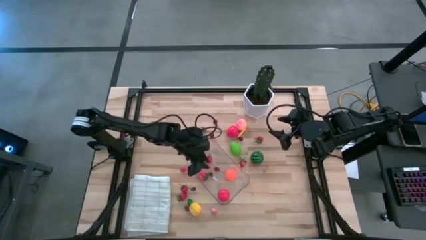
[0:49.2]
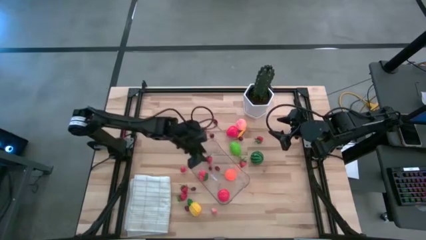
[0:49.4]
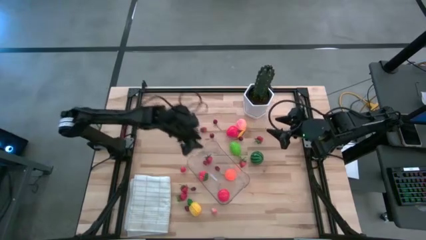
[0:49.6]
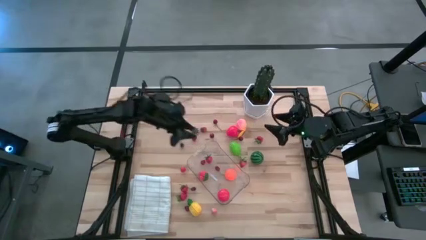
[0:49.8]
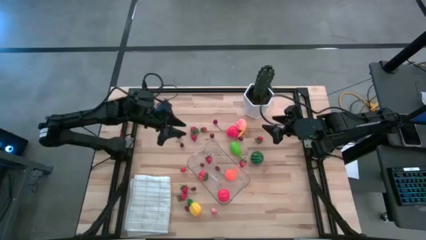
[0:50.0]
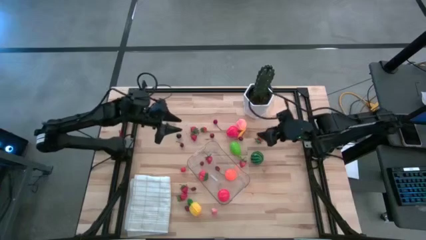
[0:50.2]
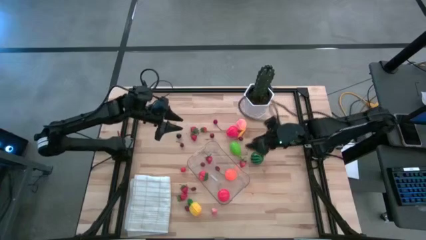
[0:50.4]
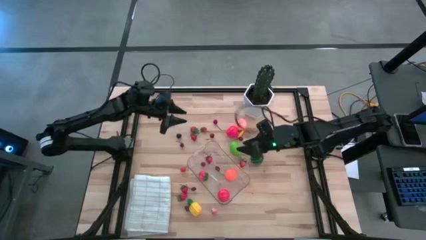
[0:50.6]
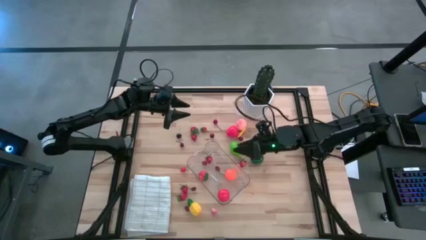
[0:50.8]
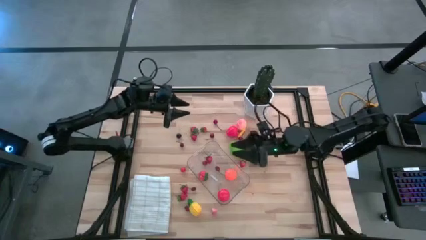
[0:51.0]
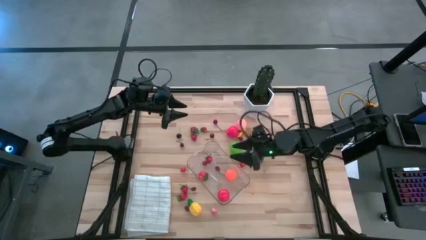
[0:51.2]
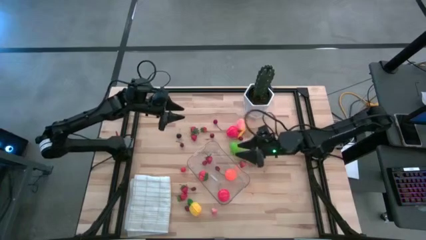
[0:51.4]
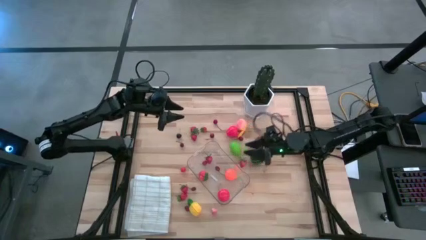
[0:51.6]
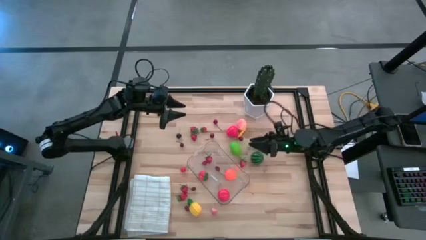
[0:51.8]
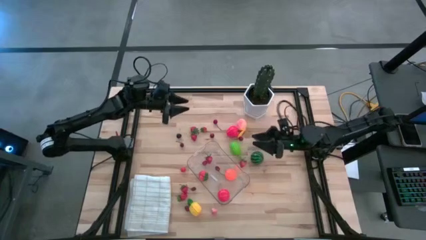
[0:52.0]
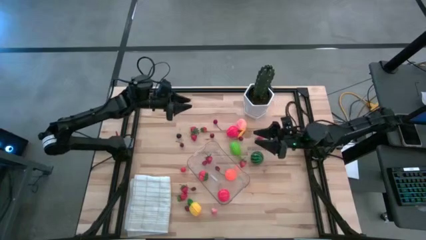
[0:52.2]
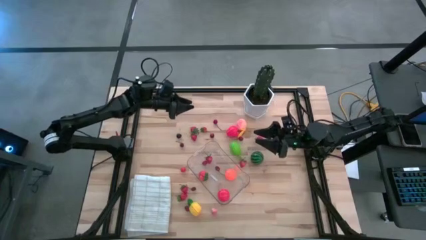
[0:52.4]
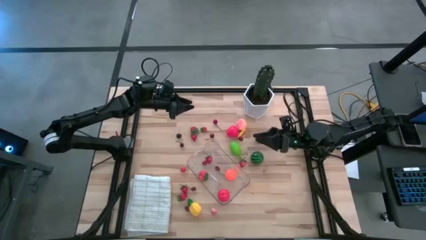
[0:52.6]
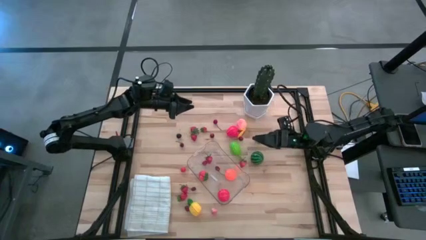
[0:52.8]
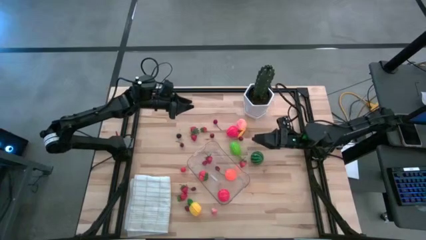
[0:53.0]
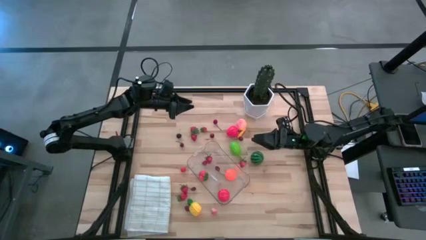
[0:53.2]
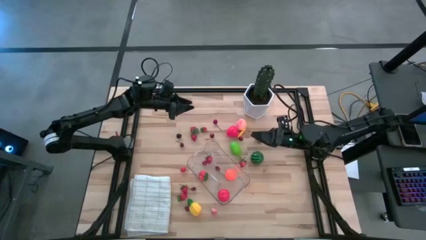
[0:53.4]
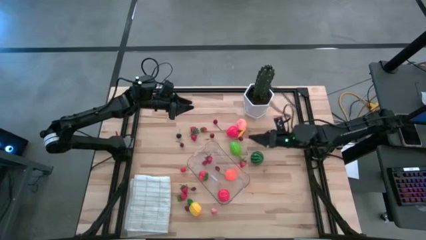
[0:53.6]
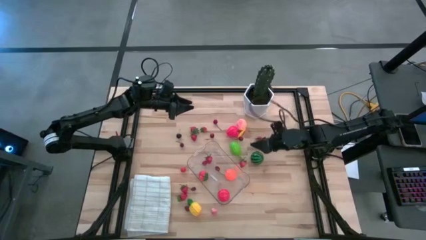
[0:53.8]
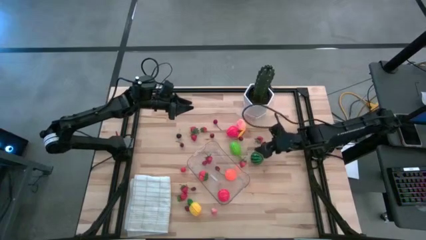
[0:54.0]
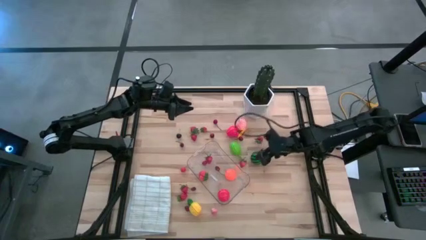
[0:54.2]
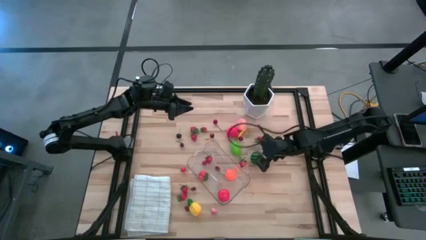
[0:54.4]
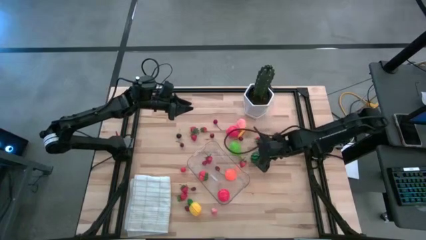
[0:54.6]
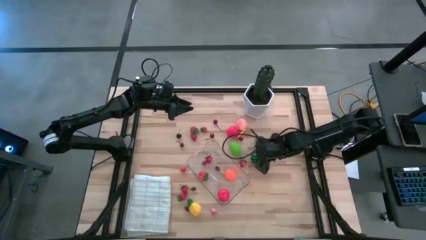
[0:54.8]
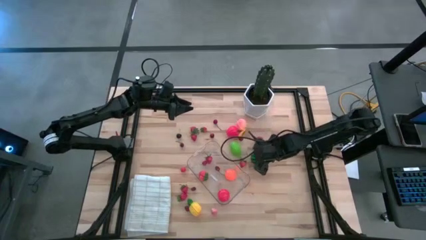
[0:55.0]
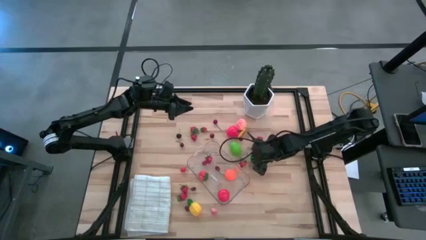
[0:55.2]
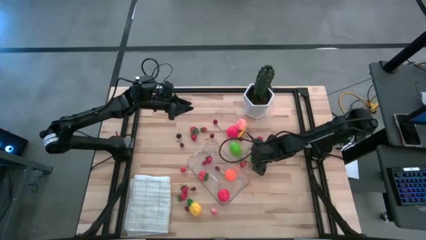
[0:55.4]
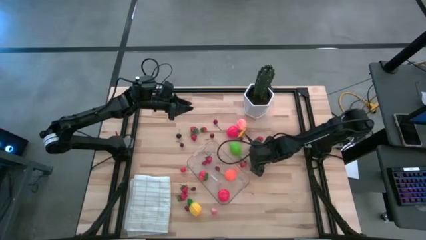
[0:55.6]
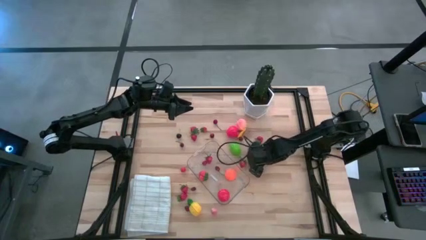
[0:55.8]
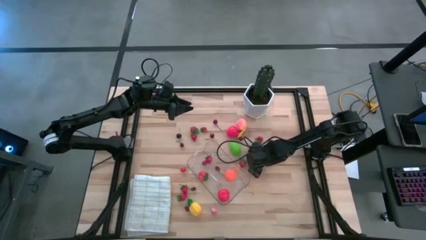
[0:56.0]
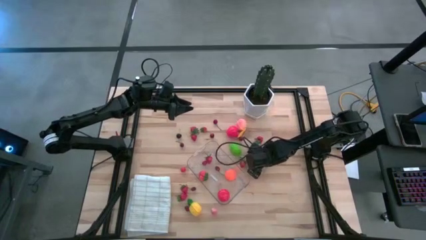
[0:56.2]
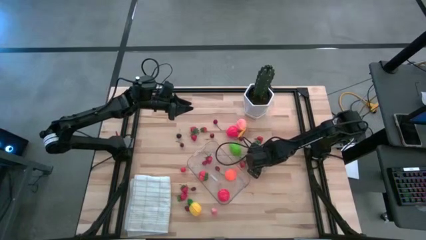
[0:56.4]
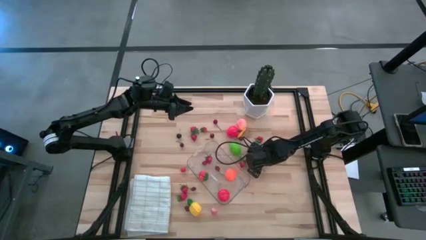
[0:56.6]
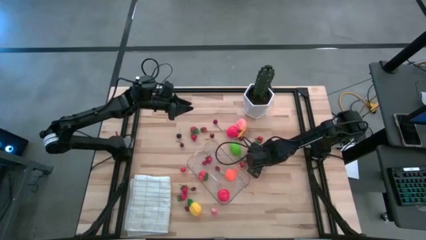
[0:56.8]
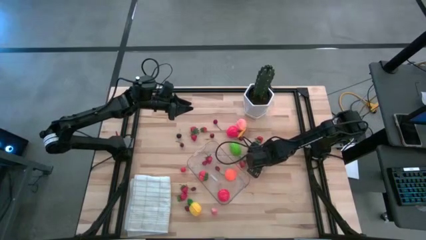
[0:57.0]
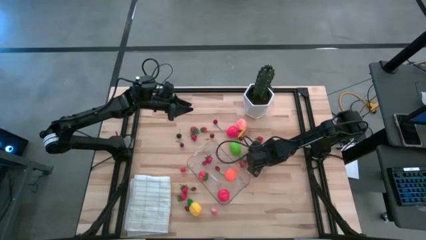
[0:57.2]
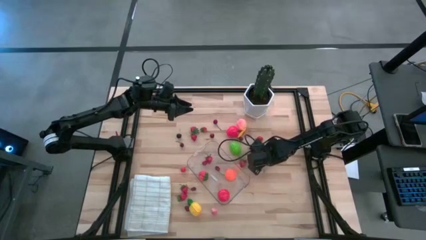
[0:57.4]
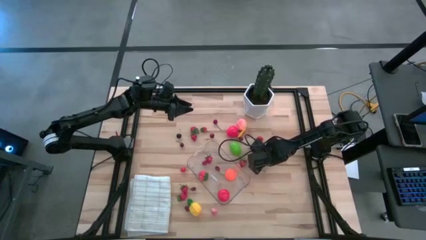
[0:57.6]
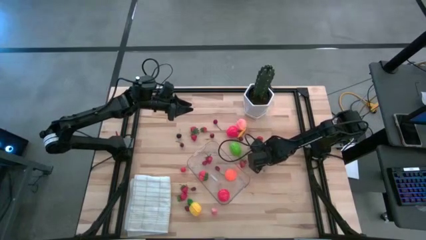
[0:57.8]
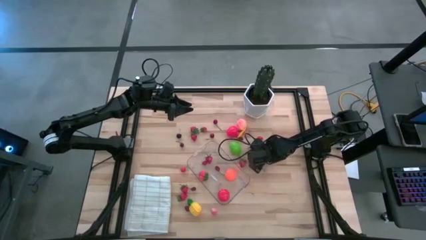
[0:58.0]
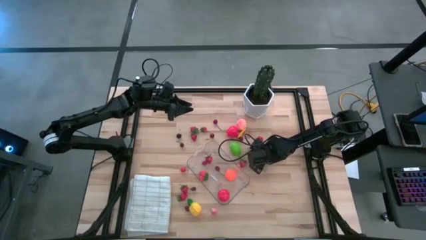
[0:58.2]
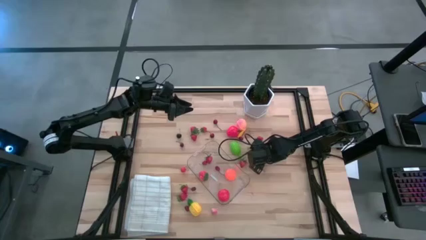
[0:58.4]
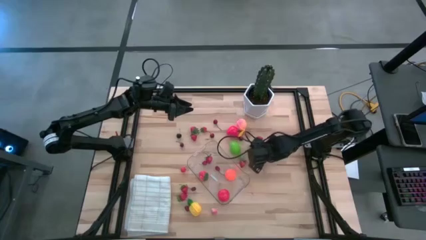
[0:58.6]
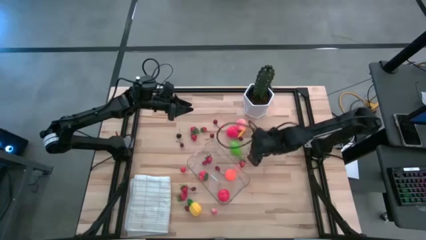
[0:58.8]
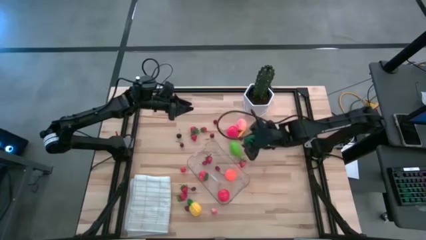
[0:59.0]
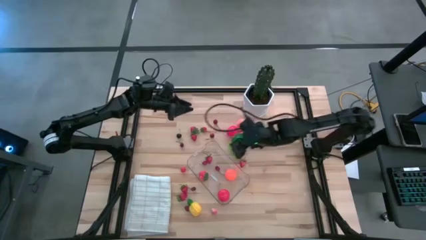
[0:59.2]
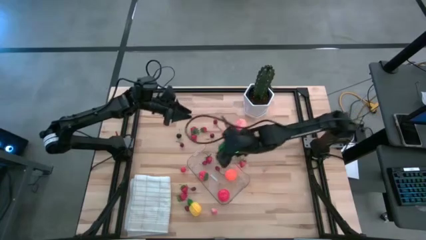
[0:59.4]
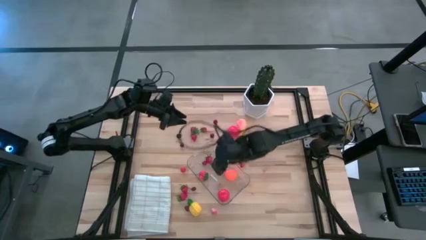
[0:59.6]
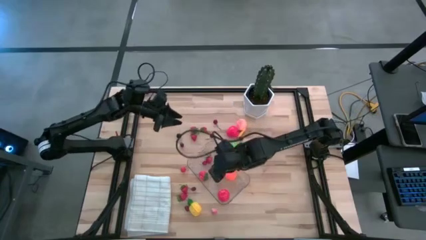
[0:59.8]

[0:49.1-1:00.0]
Task: Pick and placing Produce into tupperware
Put the green watermelon into the transparent bin

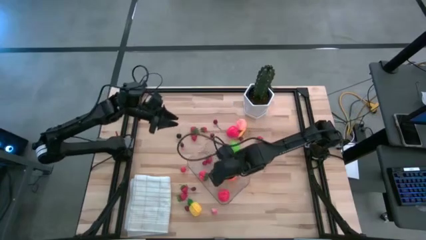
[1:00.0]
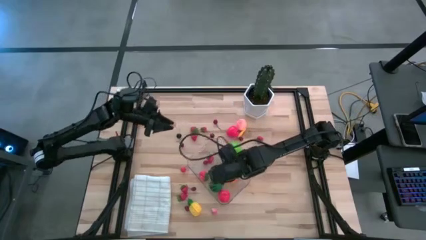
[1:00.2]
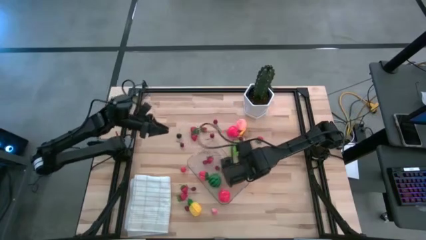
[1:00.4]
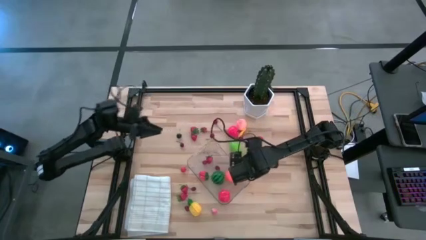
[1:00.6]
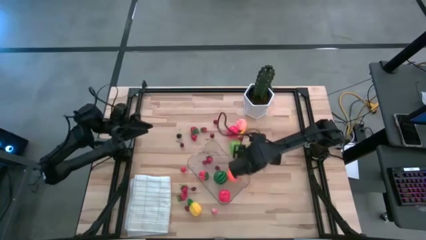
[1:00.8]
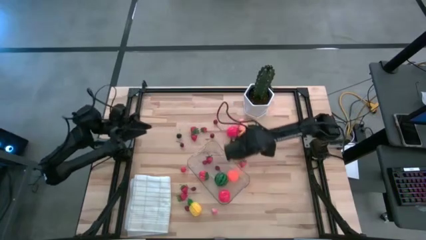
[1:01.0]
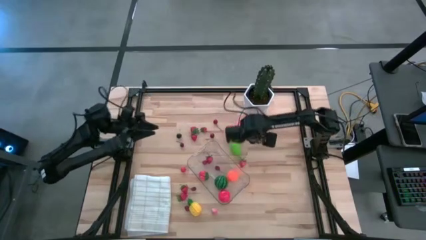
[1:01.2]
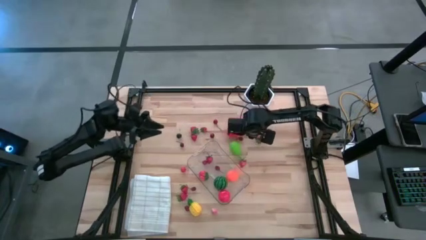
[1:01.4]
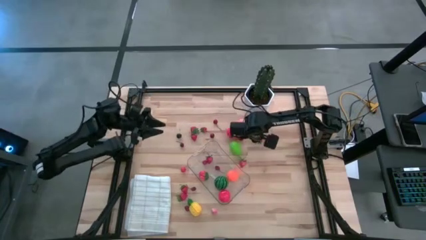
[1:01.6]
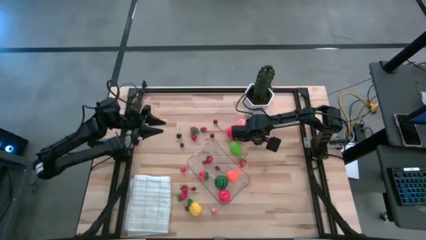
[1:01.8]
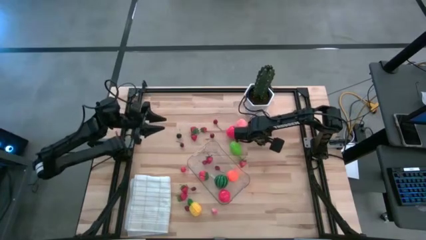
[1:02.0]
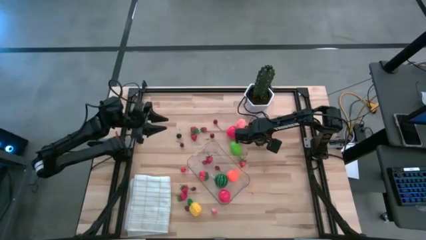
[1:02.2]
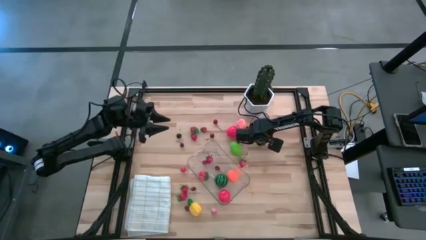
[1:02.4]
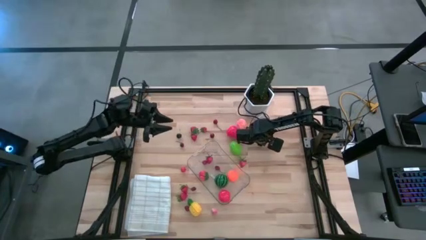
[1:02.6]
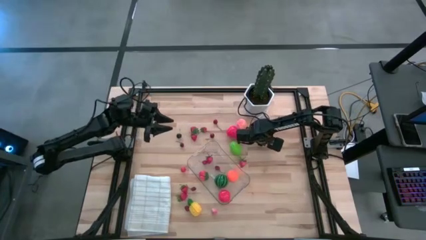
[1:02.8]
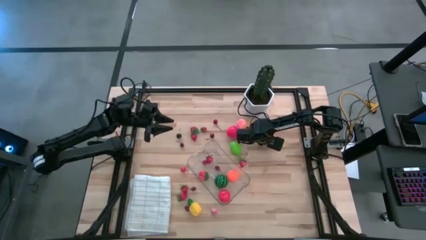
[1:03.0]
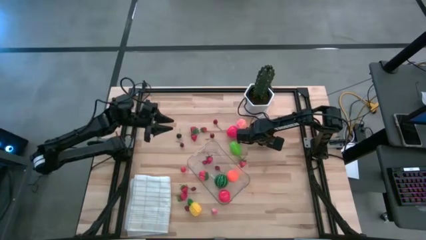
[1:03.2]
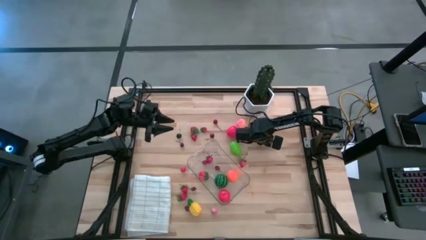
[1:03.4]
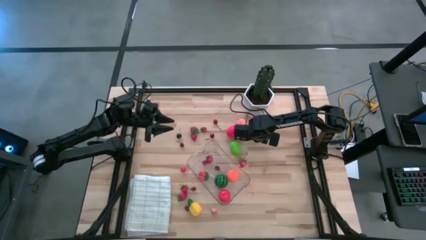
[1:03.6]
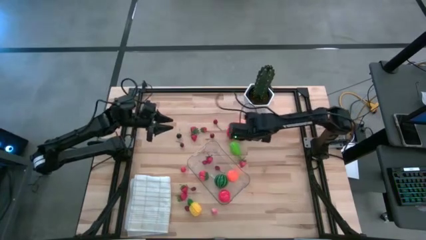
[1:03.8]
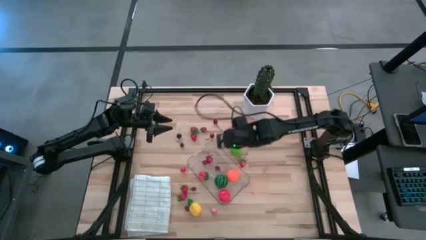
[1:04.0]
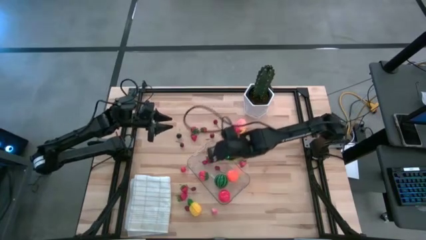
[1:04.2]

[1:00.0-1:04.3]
Put the red strawberry into the transparent bin

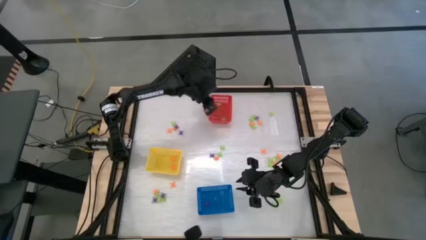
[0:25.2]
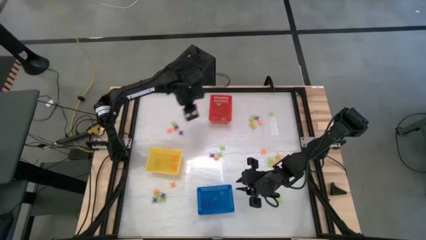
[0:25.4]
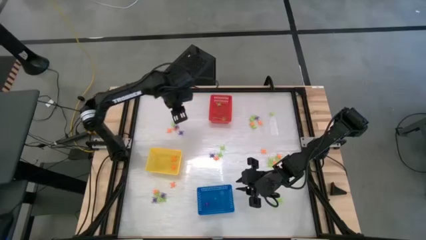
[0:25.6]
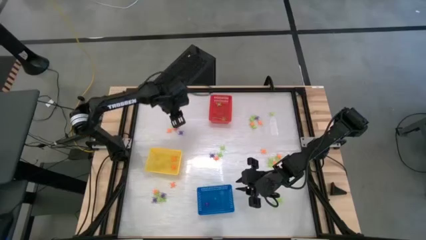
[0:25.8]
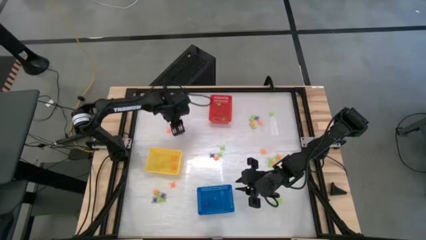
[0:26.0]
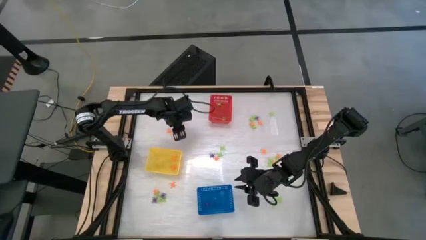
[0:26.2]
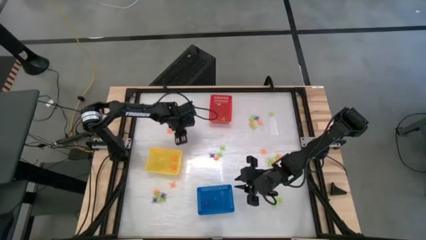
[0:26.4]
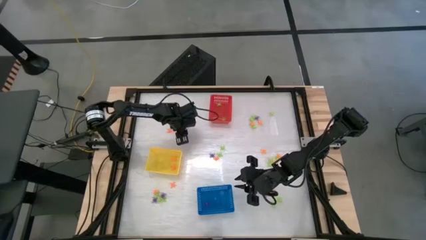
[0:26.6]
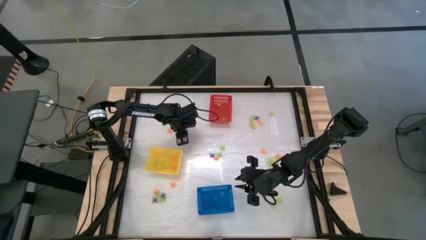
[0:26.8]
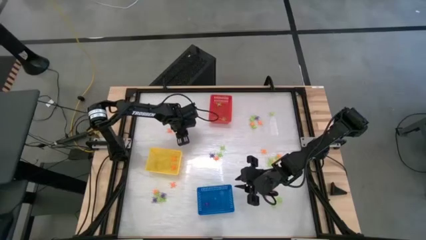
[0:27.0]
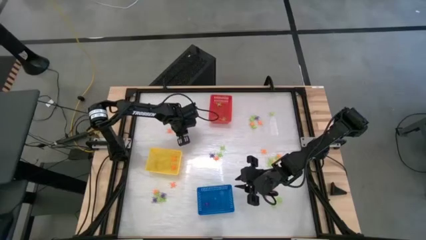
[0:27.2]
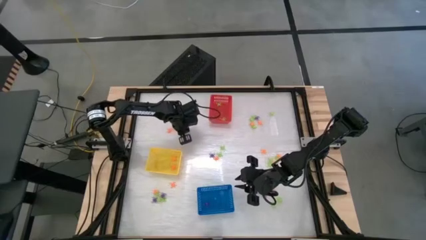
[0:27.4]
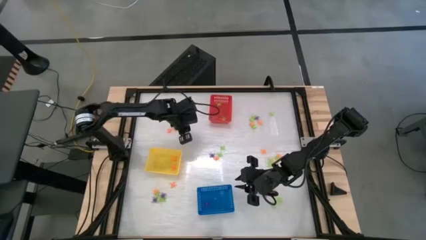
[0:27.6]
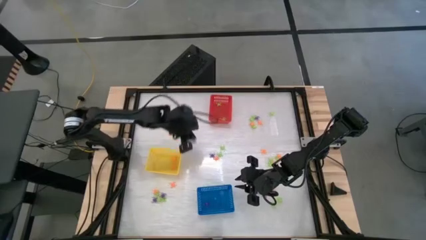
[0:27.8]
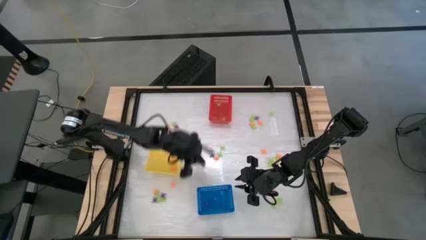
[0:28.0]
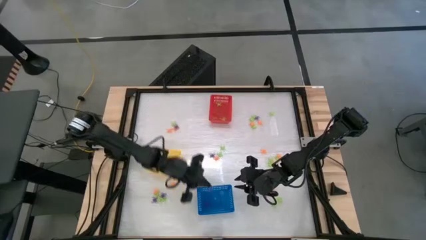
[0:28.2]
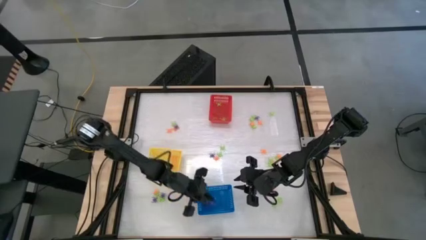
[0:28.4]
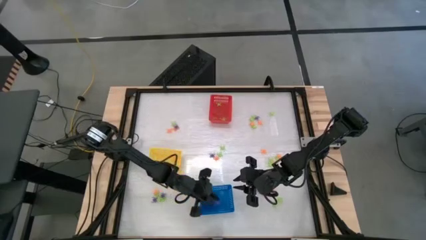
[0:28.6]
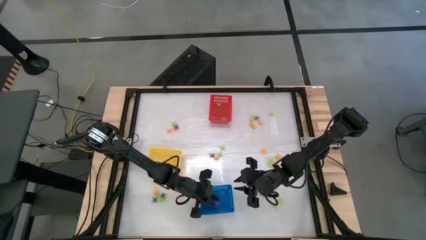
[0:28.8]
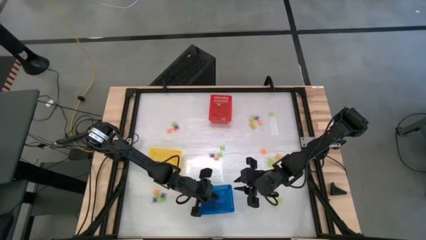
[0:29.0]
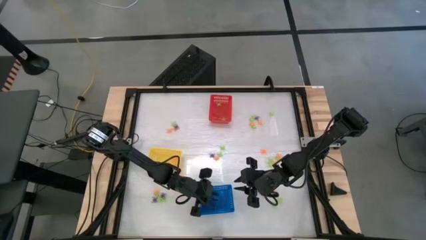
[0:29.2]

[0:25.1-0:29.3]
Task: Sort Halloween decoration
Put the purple spider toy into the blue basket
